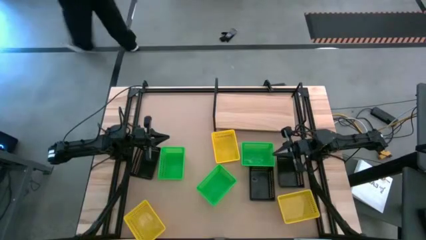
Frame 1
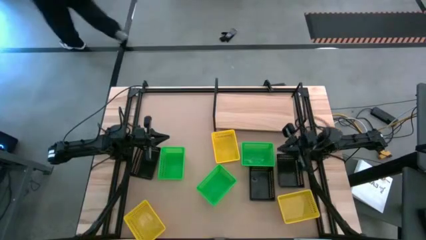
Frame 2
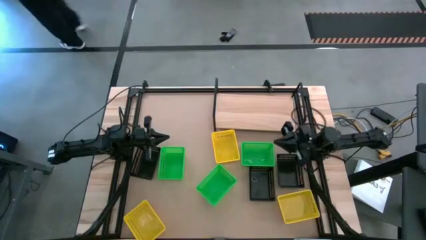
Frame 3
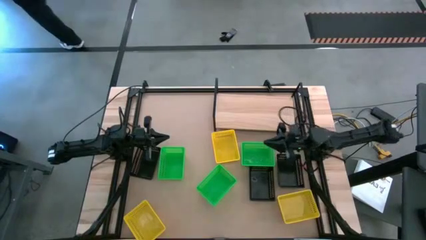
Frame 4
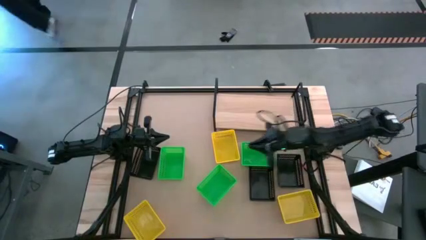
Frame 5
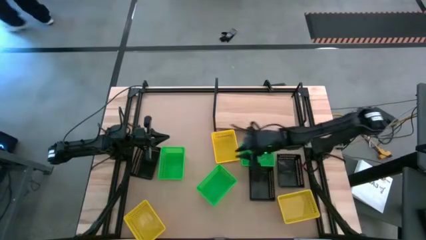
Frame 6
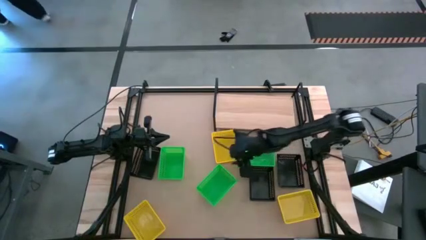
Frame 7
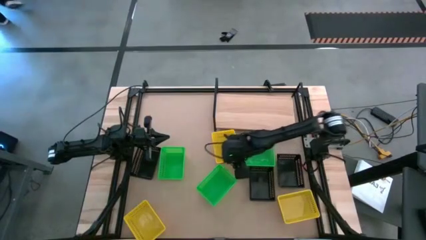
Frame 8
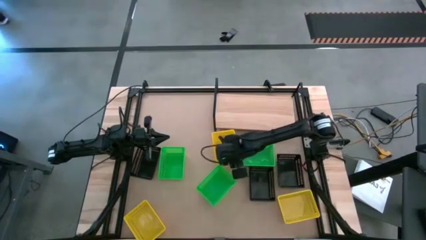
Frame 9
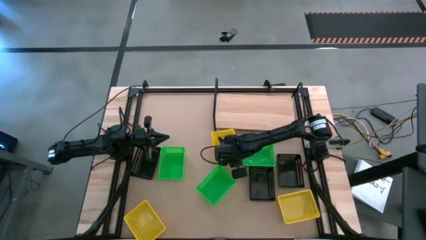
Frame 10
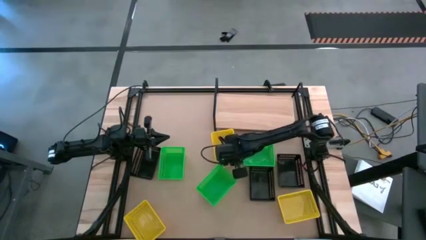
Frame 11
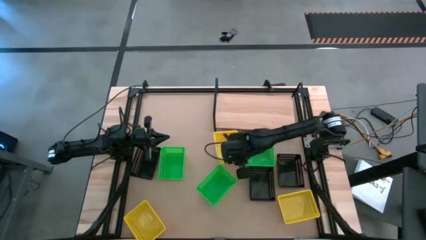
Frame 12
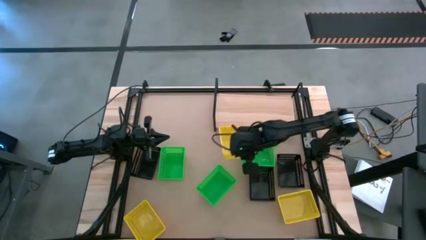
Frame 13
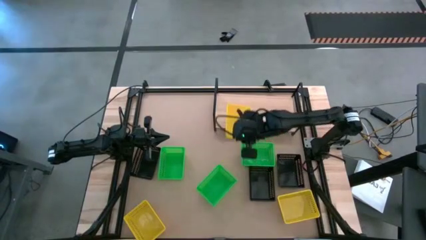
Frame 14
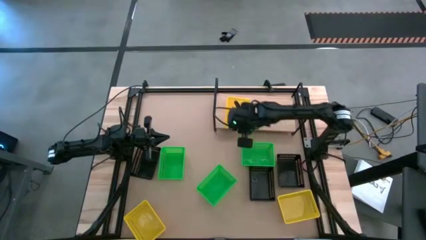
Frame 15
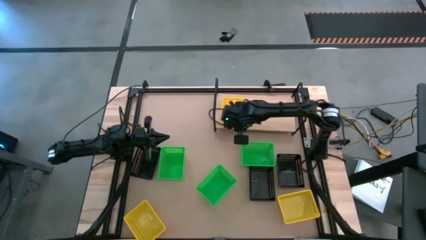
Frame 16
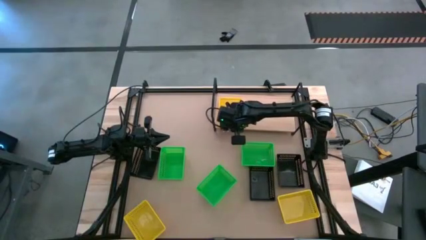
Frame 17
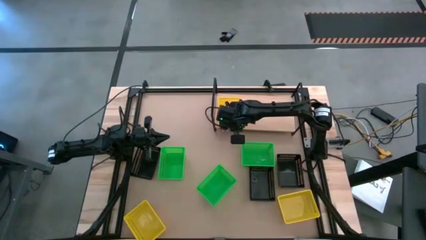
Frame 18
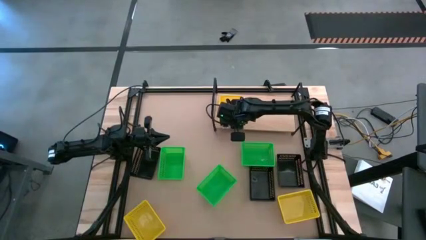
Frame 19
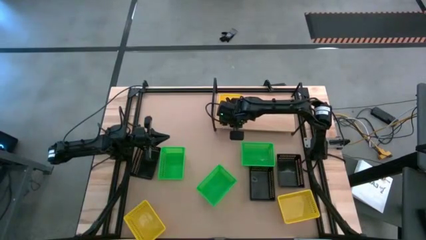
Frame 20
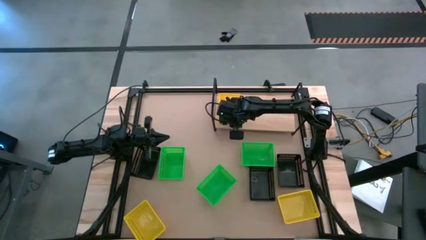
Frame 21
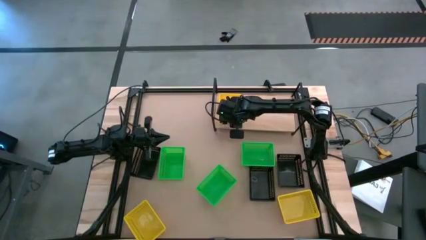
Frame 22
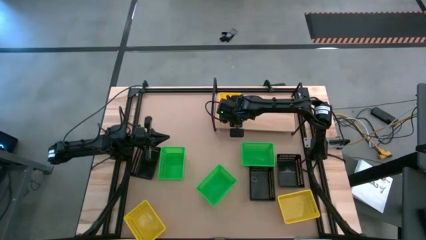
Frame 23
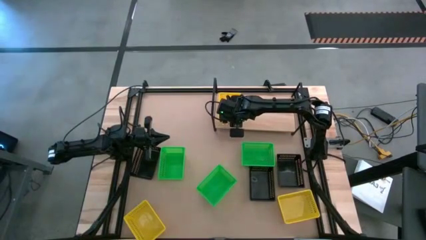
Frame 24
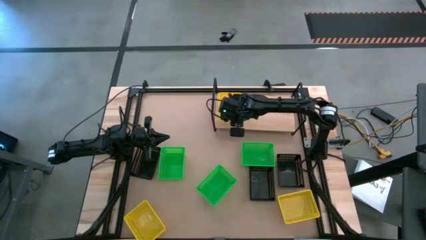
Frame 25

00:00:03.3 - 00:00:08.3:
Task: Stack baskets on shelf by color
Put the top yellow bin on the shelf

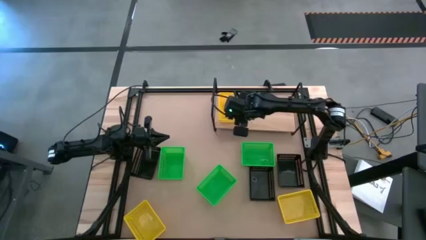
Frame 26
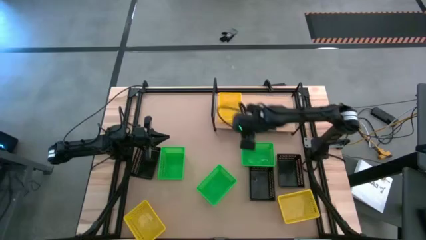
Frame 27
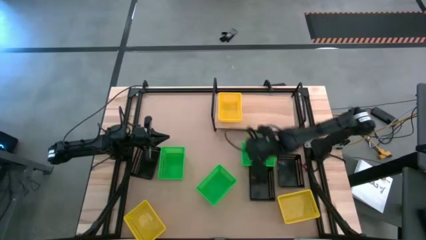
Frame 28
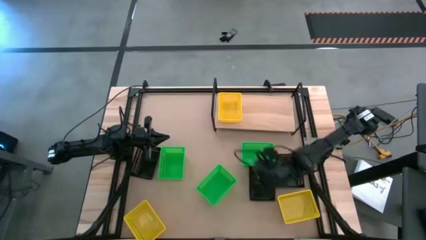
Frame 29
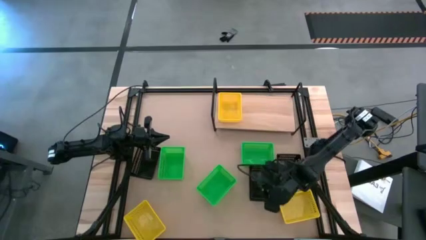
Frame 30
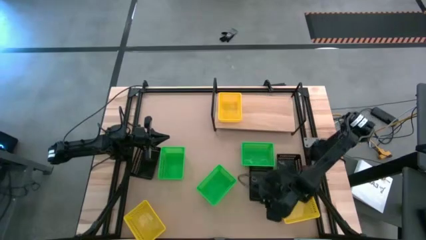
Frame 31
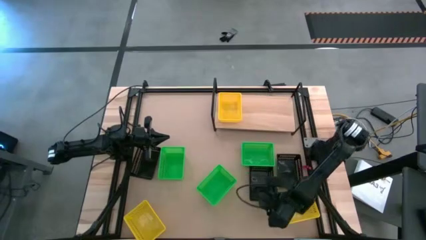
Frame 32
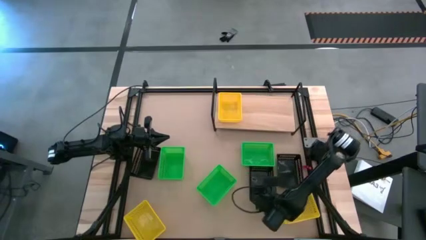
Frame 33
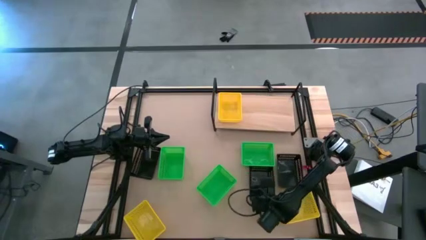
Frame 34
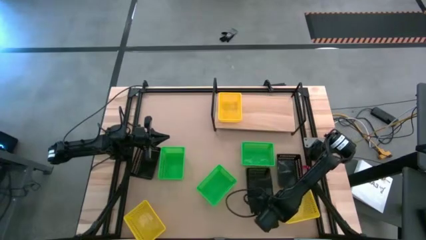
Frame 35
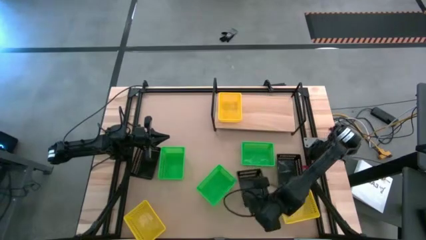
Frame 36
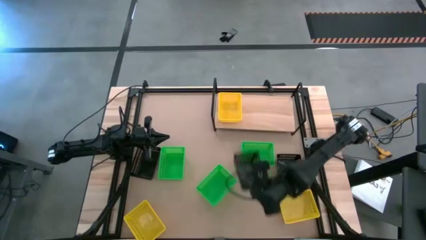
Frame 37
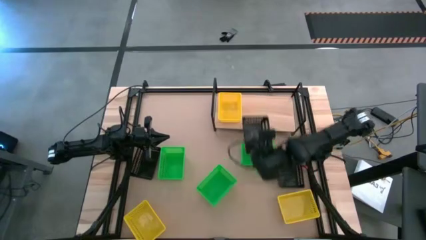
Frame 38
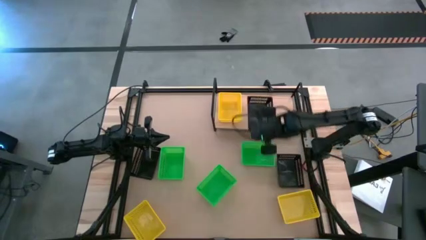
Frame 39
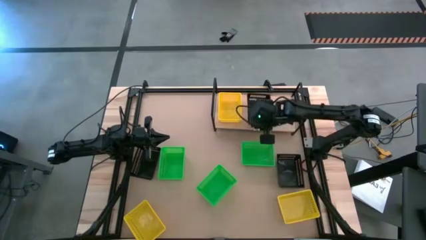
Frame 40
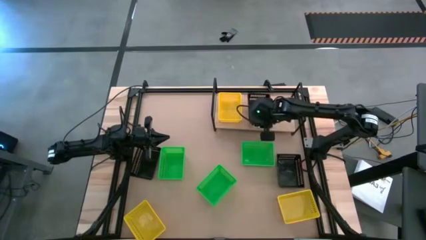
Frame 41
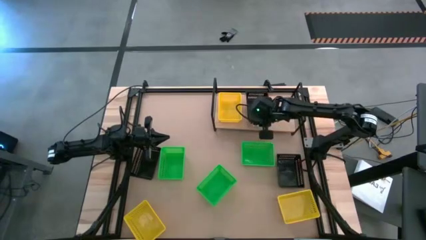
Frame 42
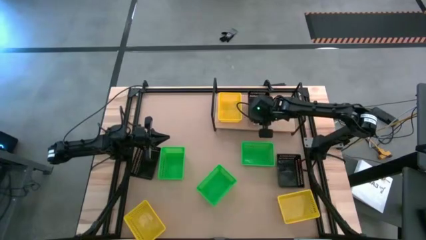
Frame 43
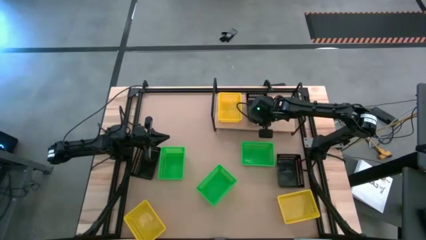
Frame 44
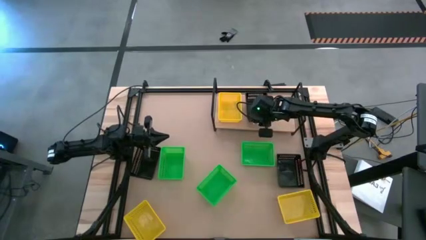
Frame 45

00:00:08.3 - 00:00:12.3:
Put the middle black bin on the shelf

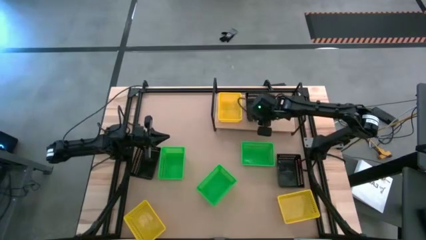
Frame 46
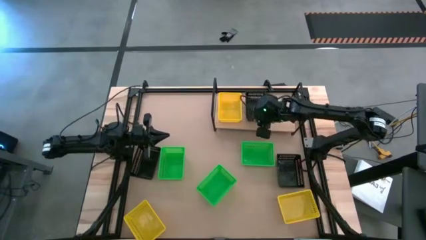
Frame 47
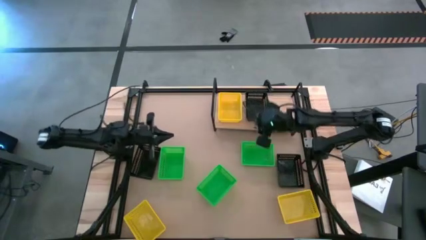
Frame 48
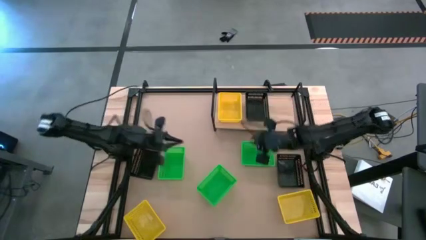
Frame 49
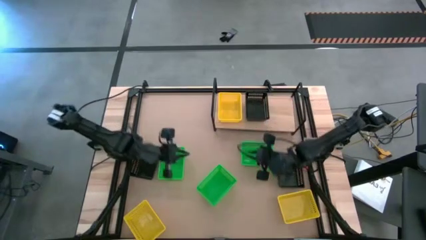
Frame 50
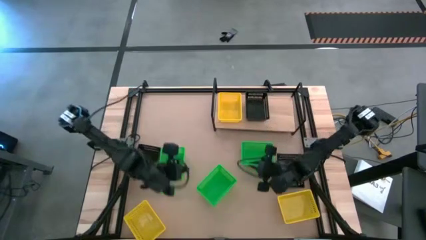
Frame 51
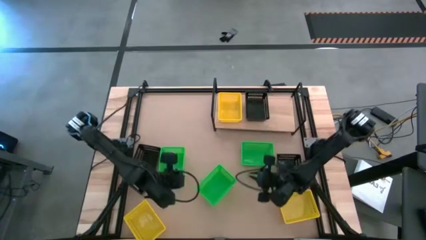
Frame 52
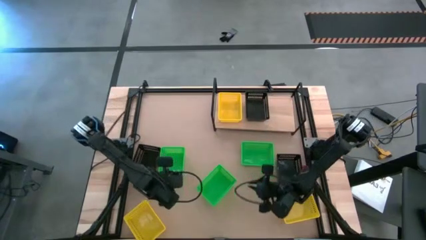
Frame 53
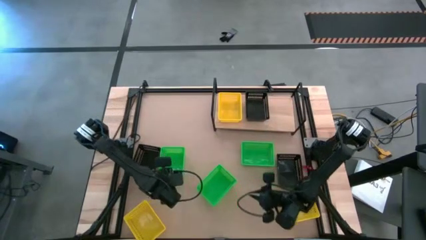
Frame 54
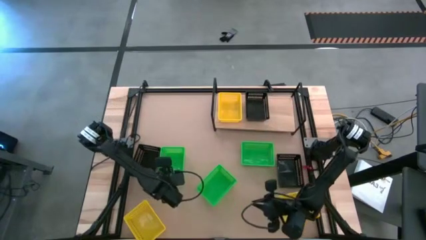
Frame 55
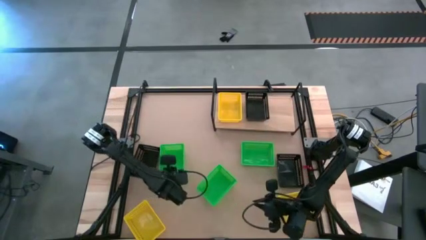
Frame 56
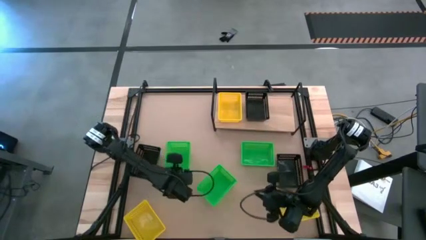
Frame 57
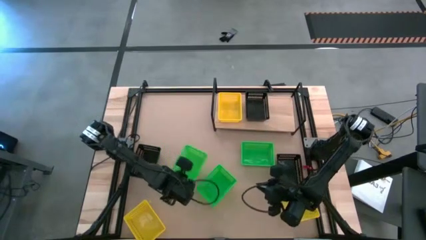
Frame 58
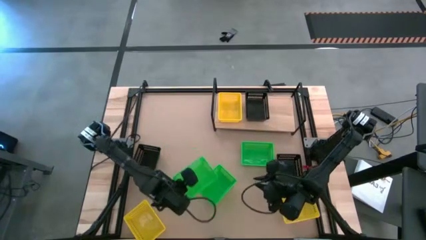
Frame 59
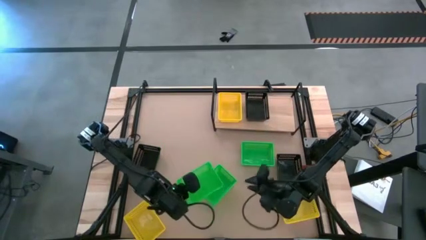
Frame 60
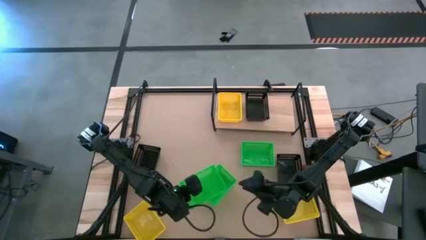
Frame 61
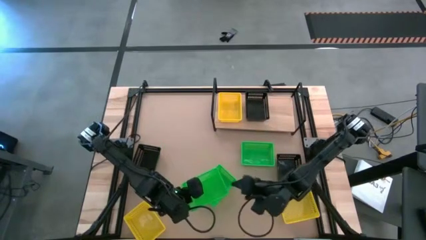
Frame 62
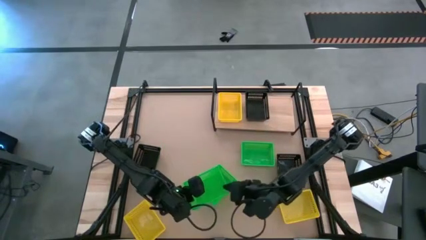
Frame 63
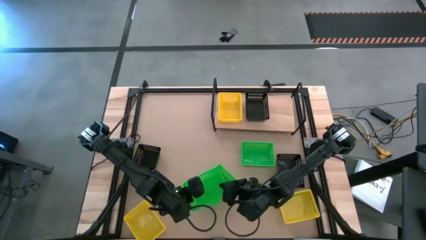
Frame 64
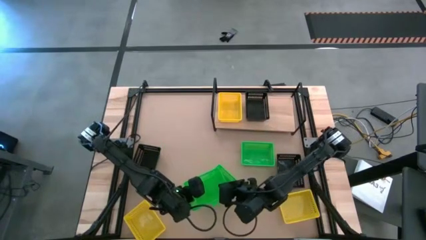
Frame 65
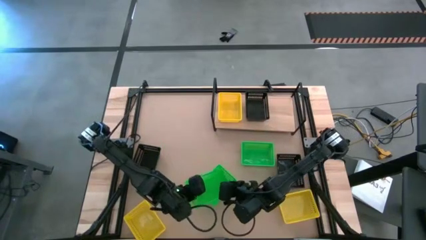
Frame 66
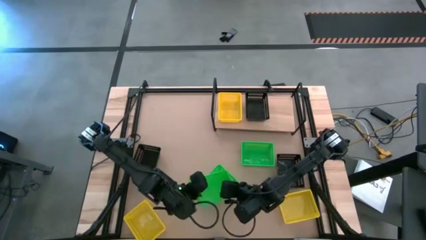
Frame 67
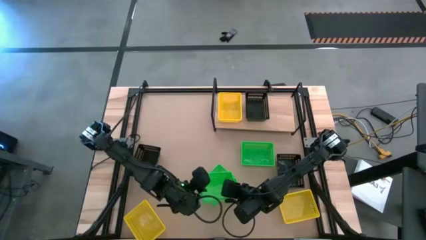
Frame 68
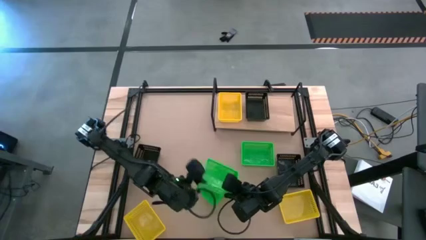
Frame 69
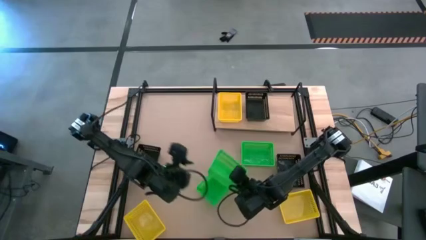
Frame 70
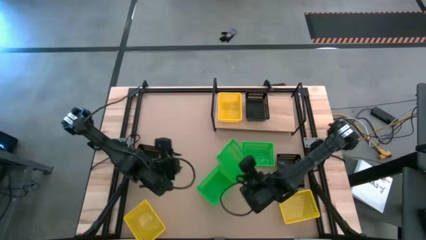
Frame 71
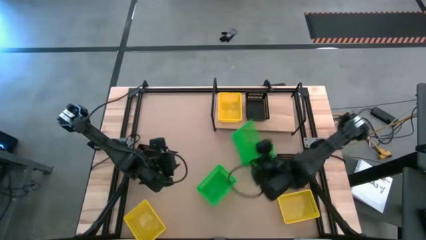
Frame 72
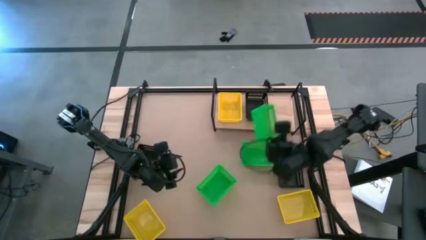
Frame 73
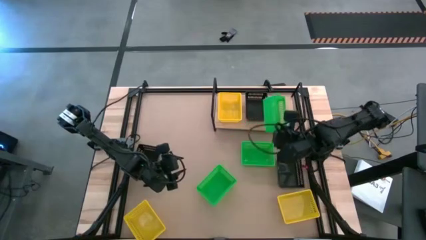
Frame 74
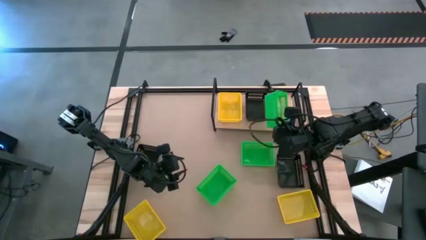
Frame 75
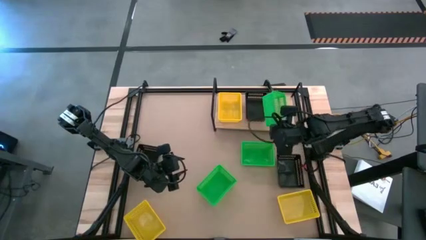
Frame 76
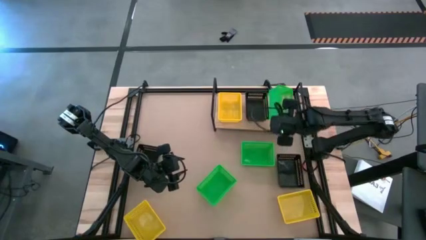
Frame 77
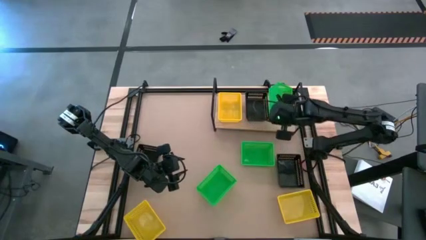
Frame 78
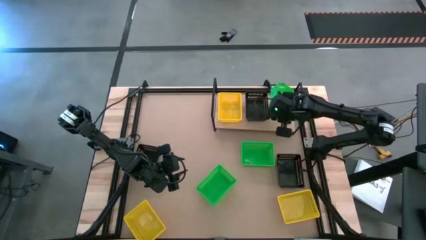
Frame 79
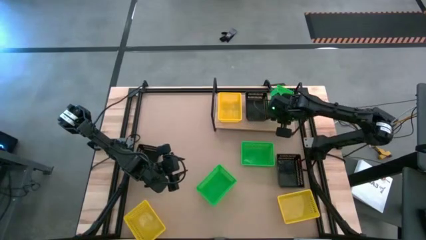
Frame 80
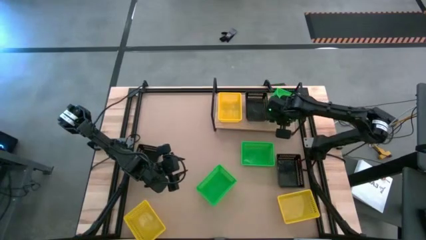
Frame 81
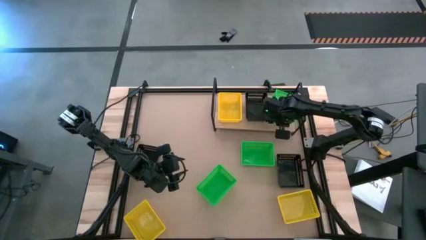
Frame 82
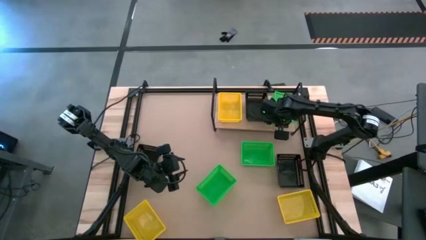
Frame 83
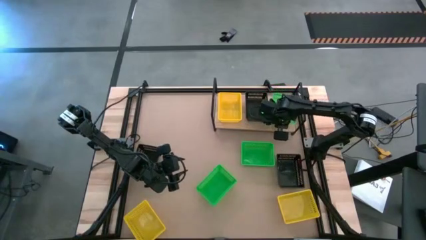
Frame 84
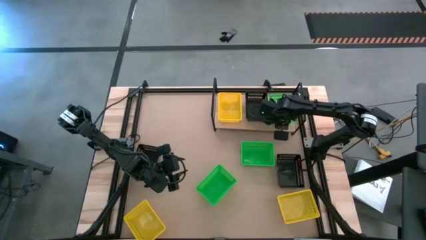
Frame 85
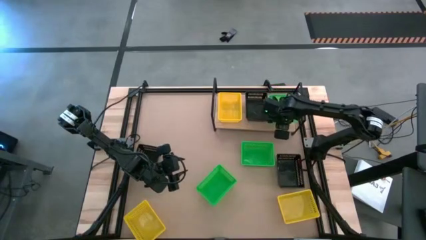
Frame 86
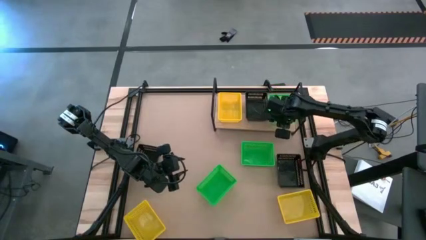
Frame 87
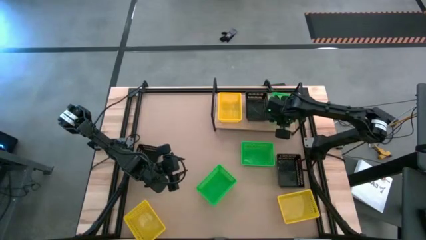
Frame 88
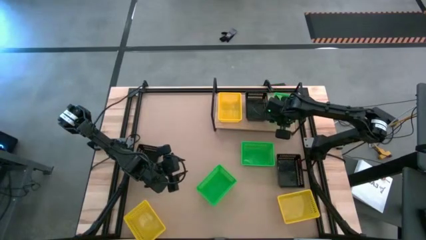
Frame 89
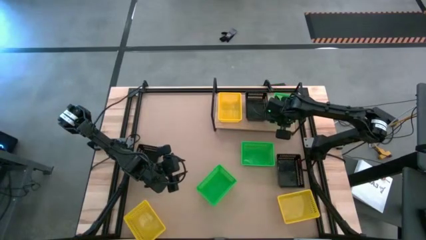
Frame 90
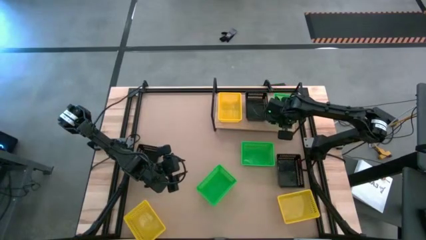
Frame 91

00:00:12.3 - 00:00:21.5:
Put the left green bin on the shelf
